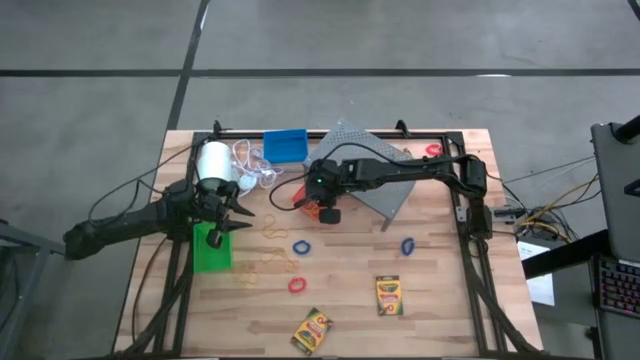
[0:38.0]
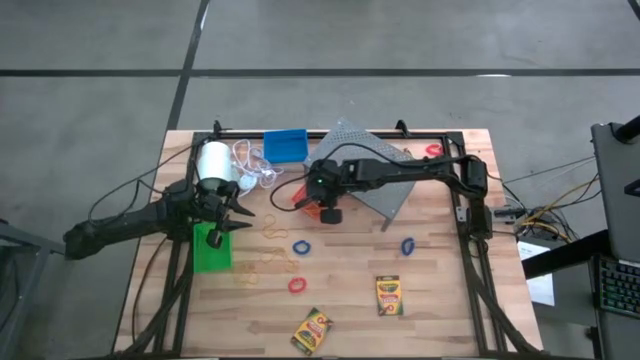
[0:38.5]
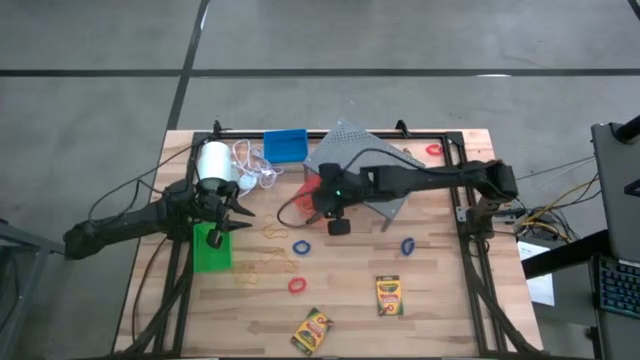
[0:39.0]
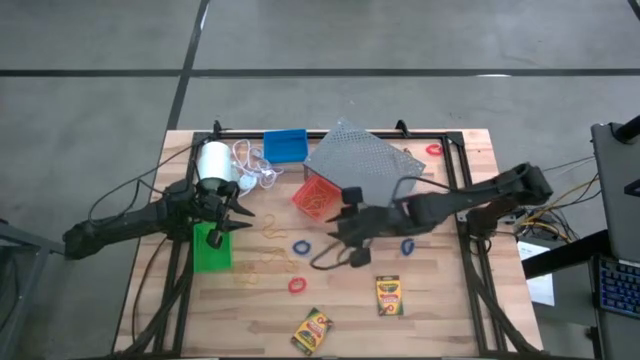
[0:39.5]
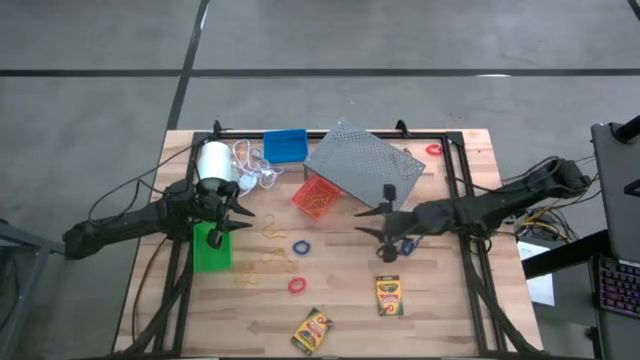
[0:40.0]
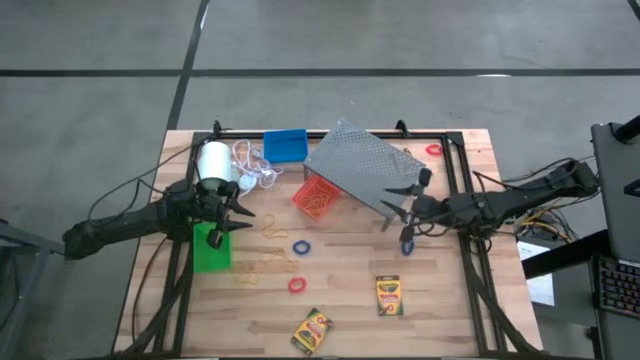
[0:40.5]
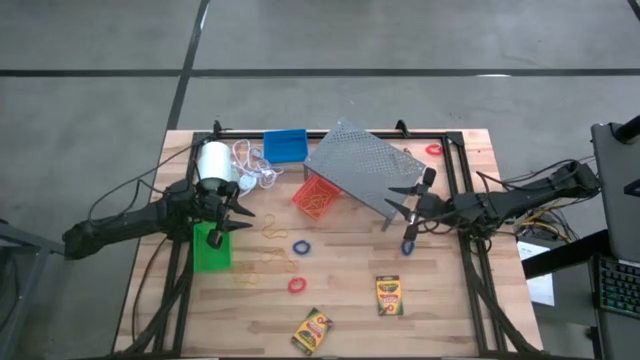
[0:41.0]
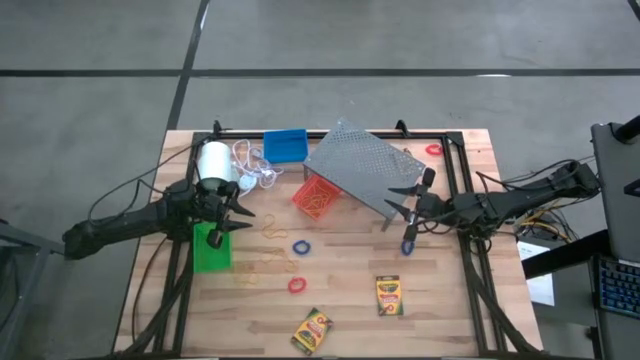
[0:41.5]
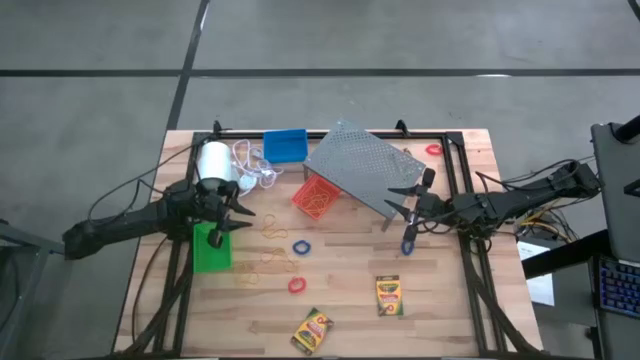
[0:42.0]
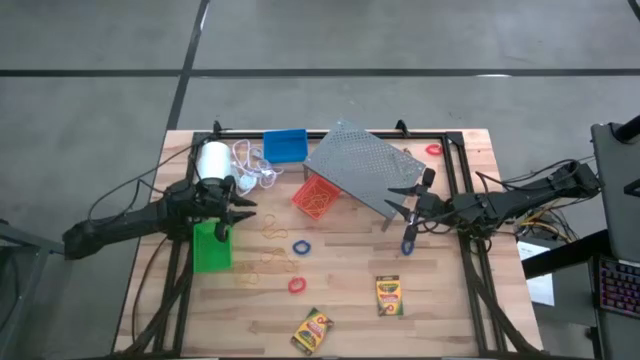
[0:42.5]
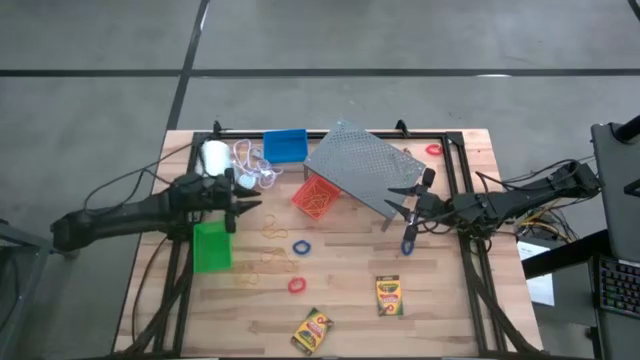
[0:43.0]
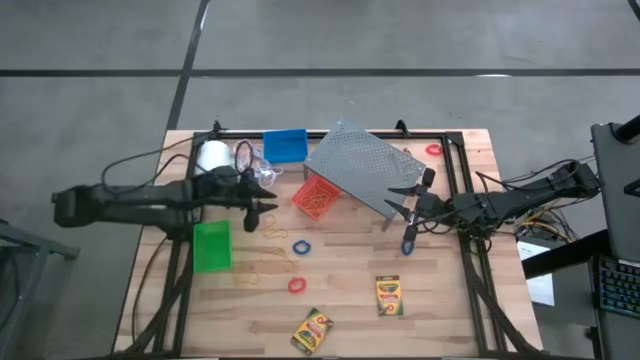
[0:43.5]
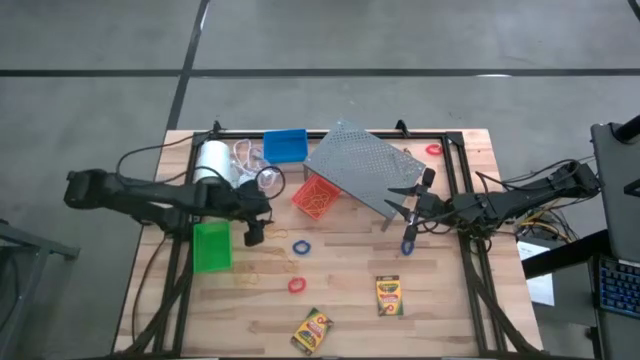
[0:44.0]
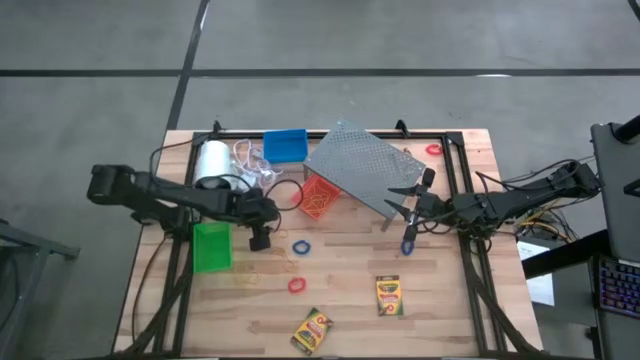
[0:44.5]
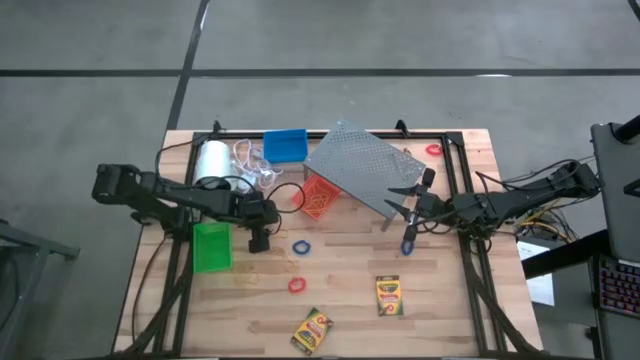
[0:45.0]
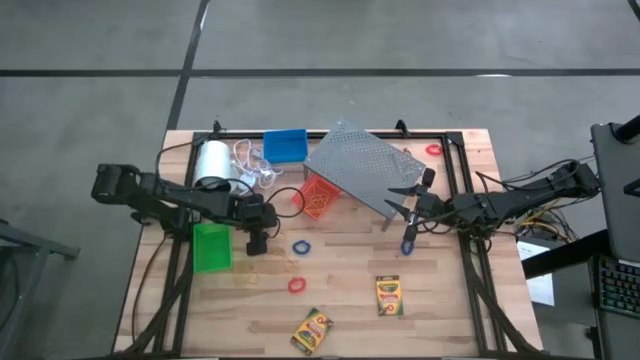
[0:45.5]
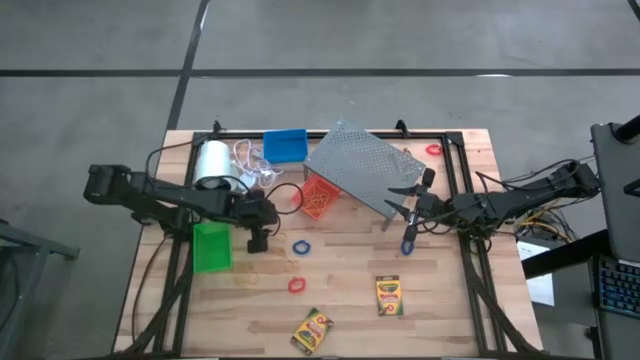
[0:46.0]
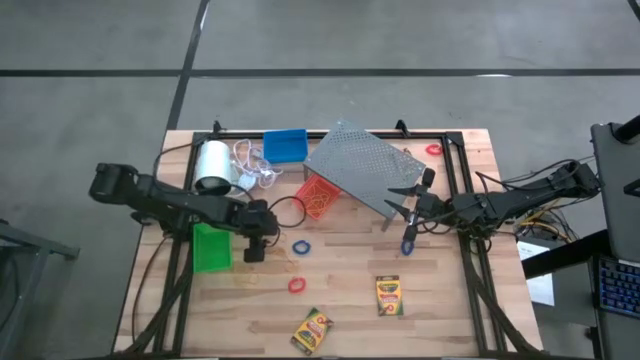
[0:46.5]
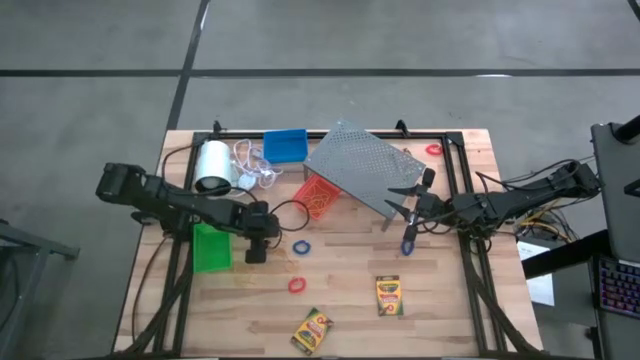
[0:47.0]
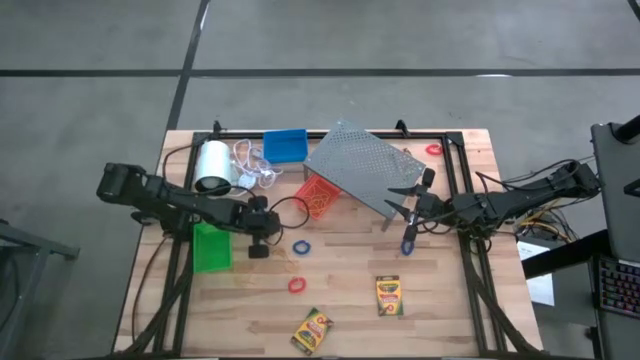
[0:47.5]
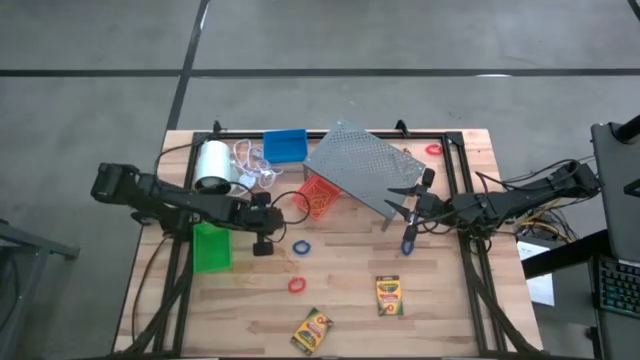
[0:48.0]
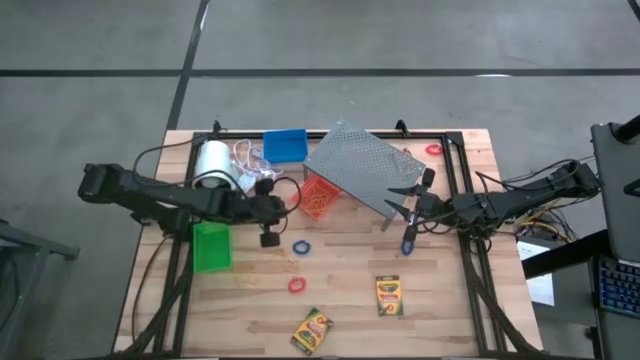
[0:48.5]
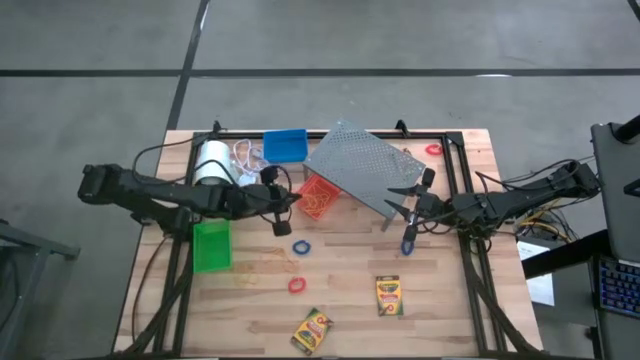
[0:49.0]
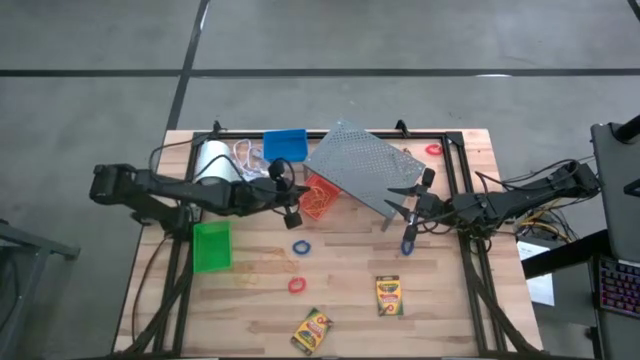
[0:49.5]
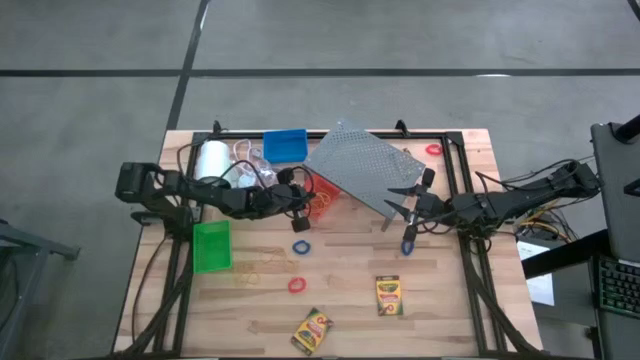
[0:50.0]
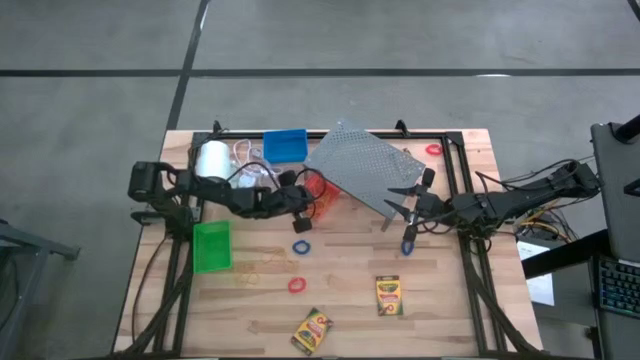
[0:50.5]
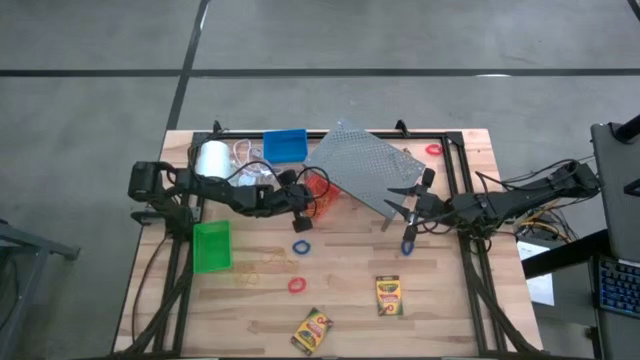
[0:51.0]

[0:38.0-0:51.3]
Task: Pick & Place Office Desk Supplies
Put the yellow rubber band into the orange bin

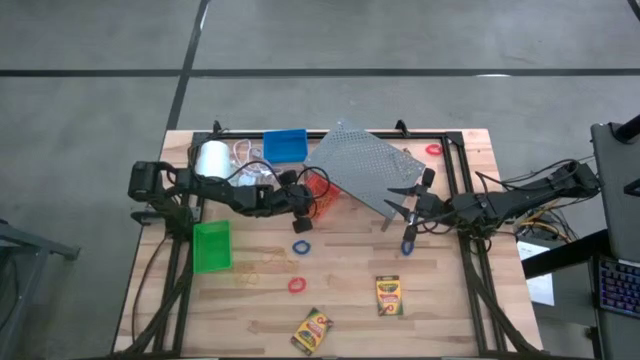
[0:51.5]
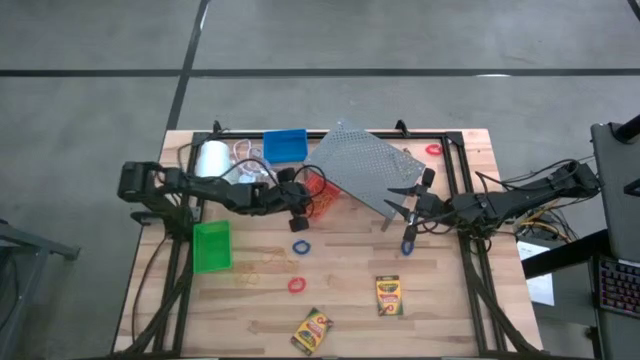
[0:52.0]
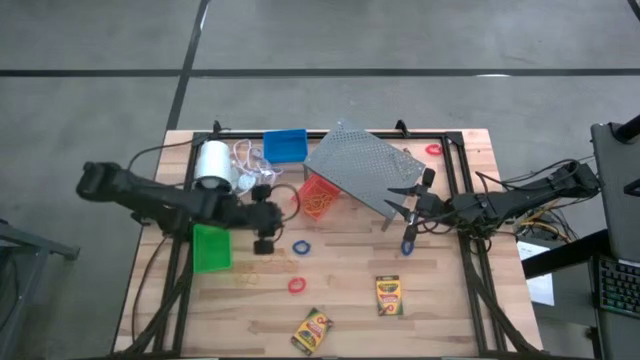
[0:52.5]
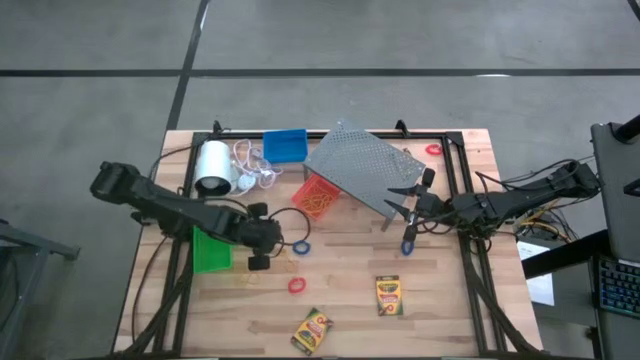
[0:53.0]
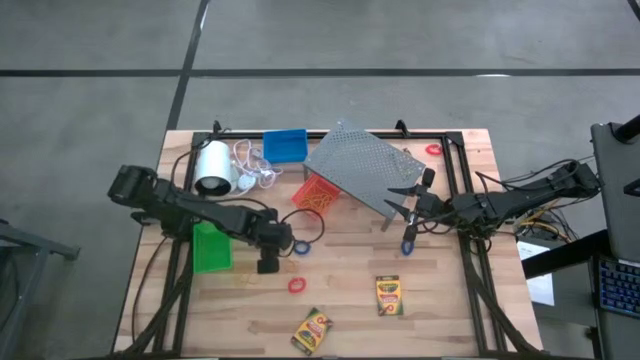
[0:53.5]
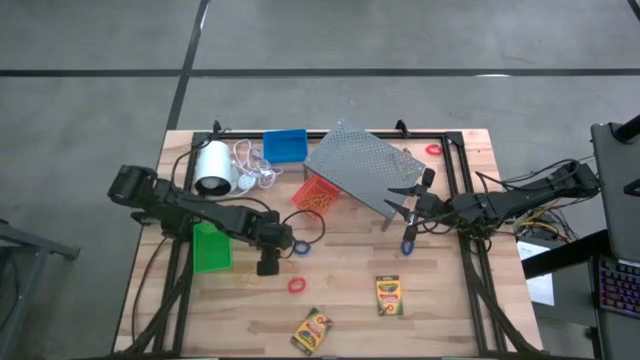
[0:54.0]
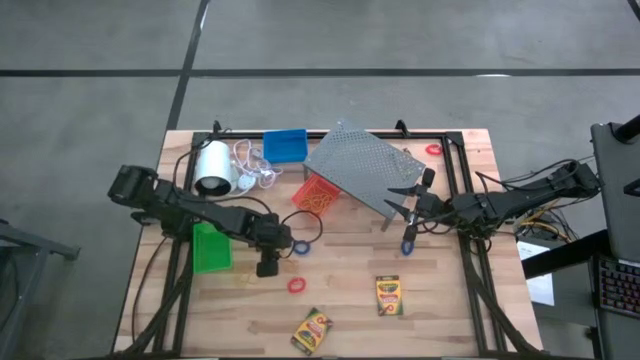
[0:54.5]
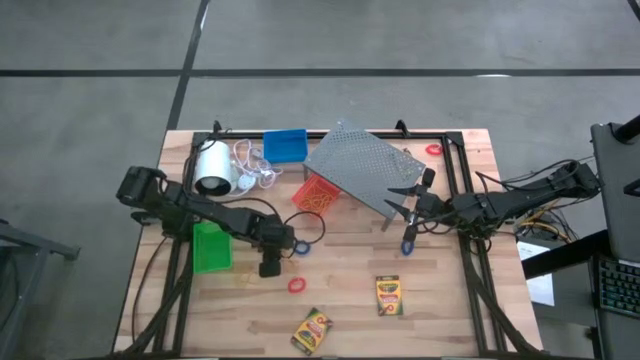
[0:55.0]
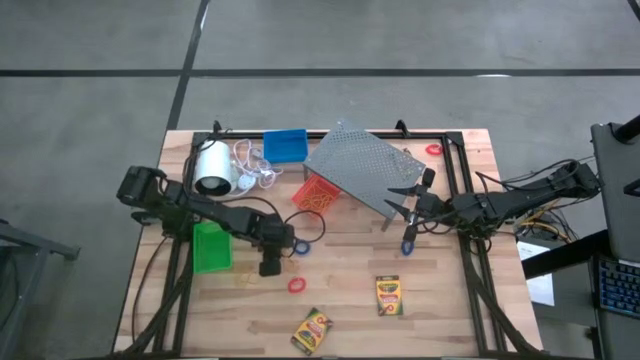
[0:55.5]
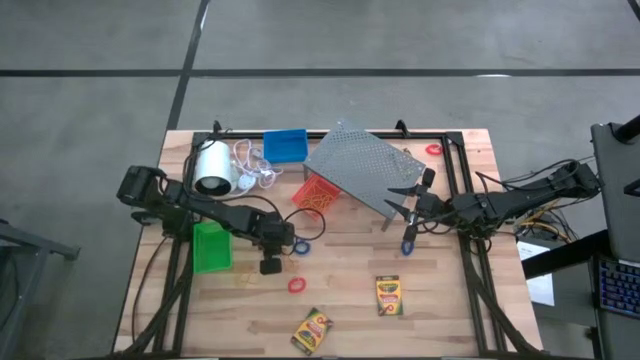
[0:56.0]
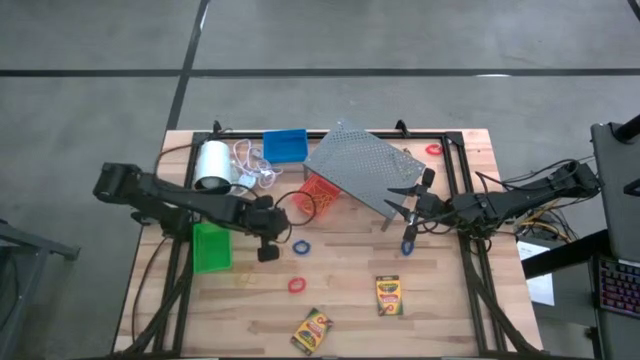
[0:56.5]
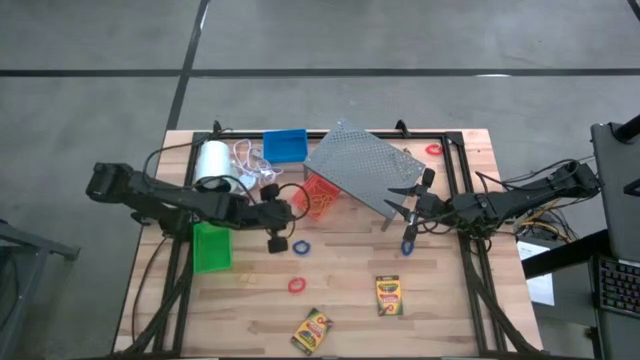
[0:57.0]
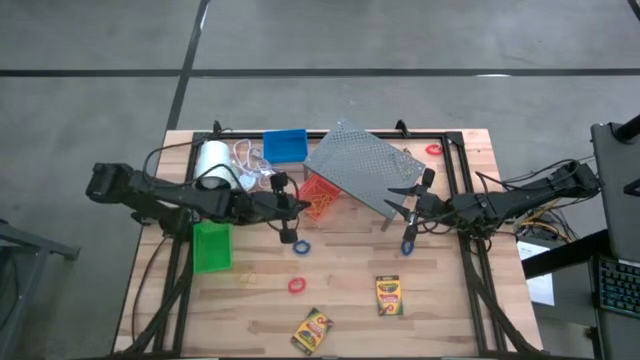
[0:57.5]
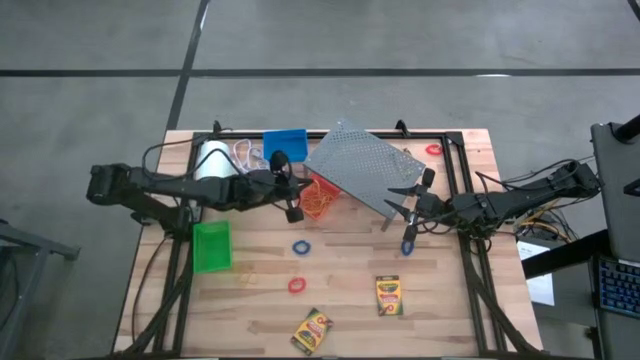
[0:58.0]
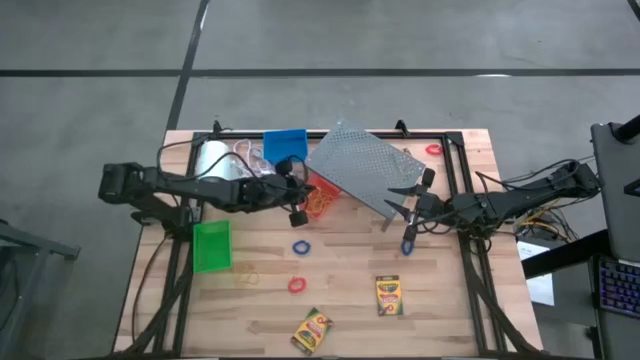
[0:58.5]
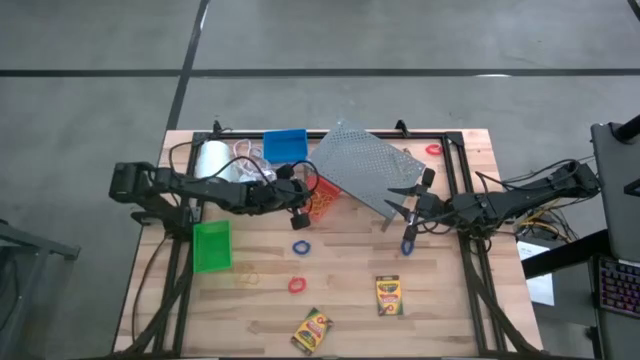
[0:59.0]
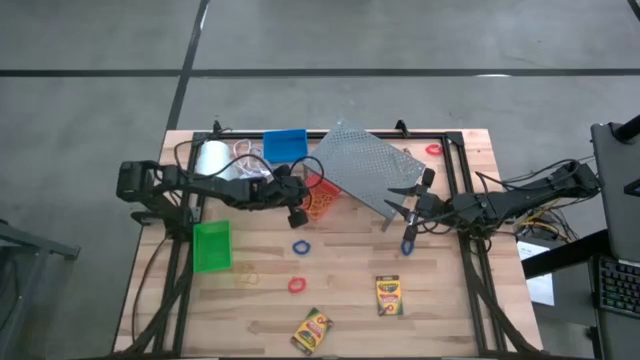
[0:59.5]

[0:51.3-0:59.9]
Put the yellow rubber band into the orange bin
